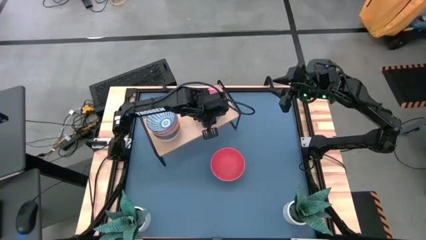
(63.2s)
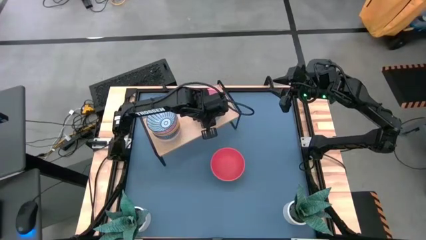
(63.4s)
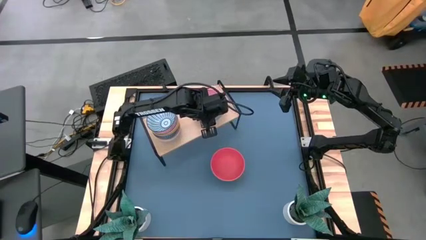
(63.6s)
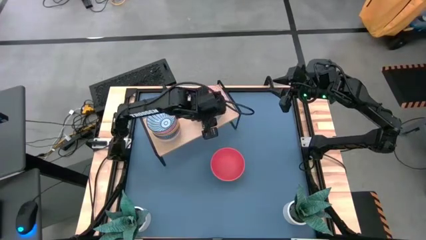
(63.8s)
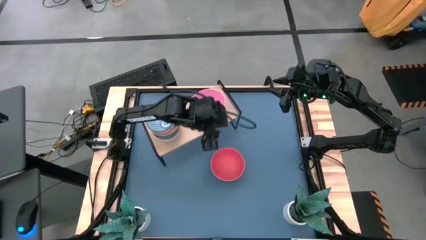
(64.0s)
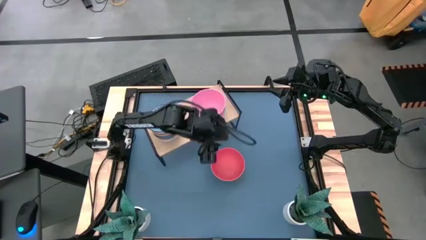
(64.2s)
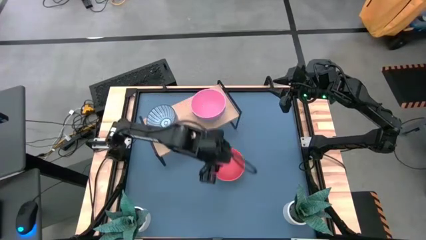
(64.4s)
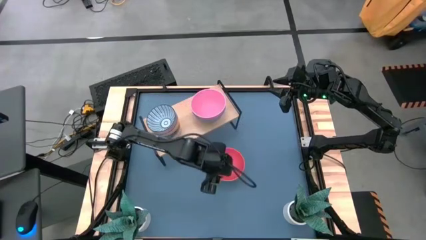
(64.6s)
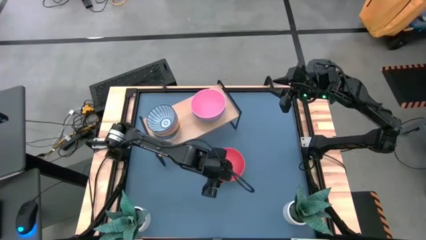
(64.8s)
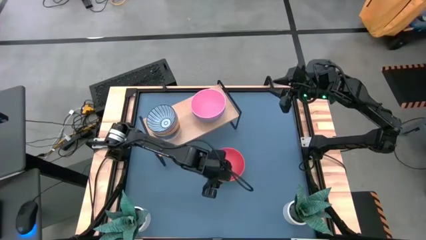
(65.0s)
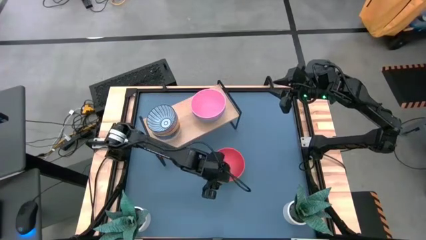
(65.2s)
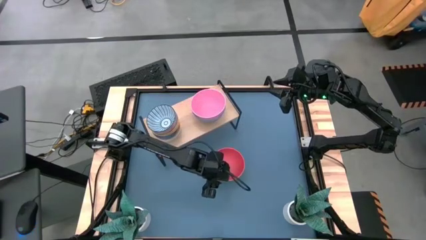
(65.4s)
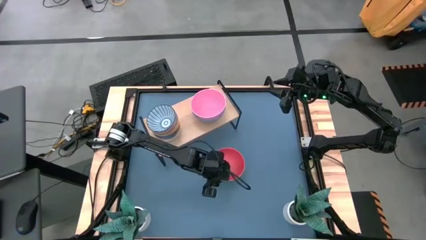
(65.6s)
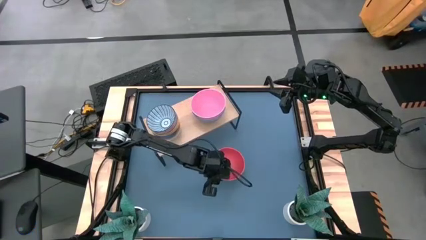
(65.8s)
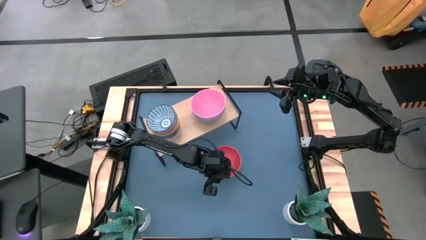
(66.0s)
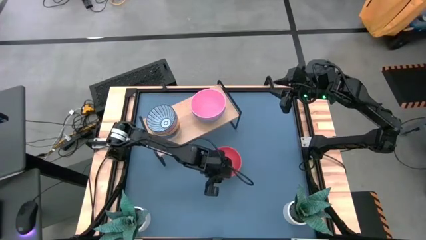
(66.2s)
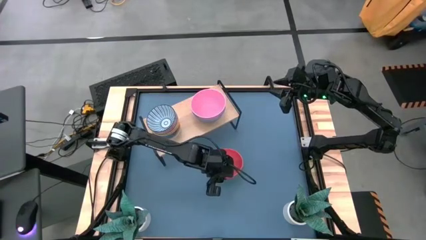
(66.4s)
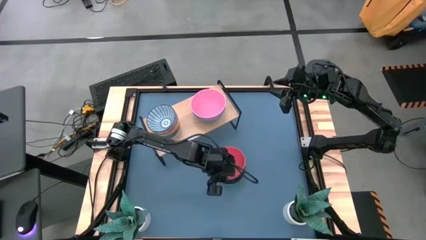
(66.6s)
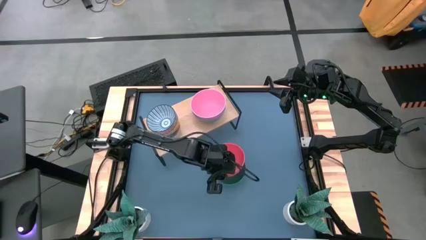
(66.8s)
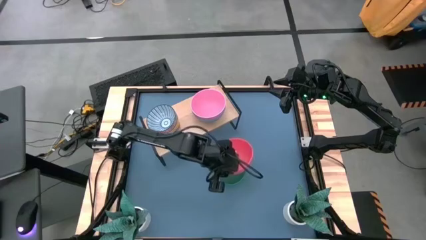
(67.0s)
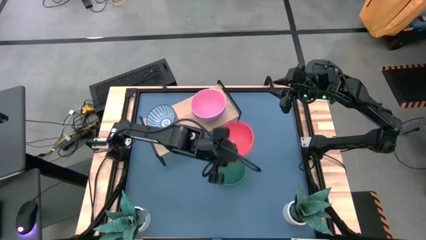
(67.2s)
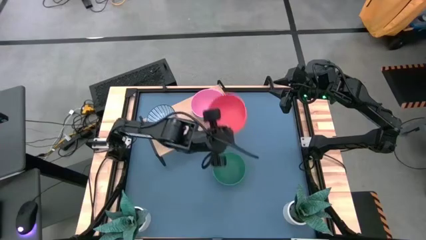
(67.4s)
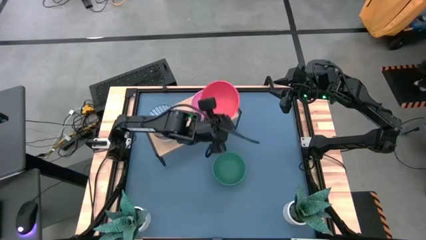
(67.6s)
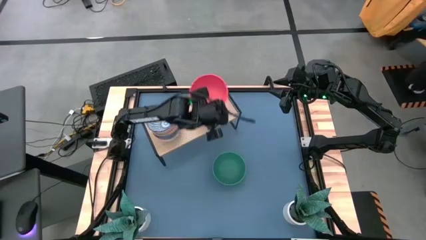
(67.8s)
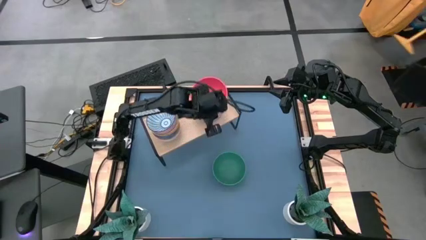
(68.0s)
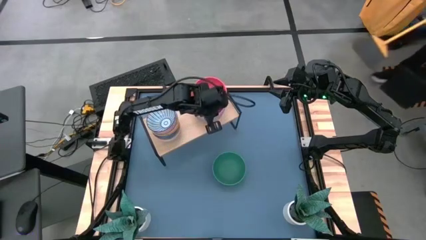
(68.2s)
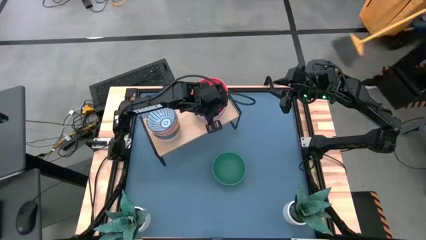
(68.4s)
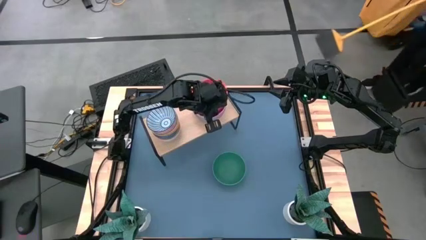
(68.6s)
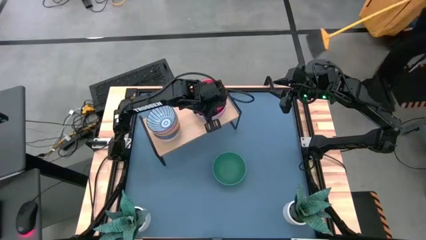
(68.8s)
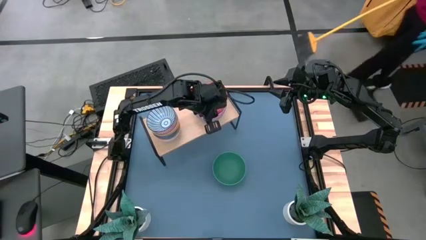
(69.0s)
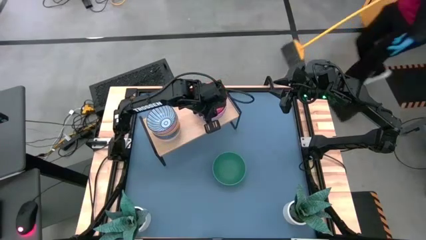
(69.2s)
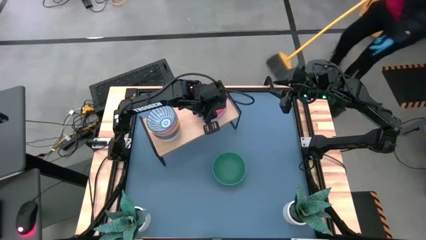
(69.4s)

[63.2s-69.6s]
Task: Place and stack bowls onto a shelf
Stack the big orange bowl on top of the big pink bowl on the shelf

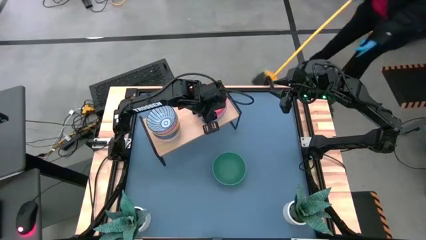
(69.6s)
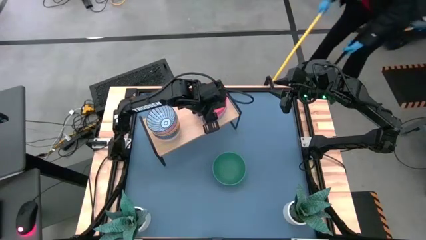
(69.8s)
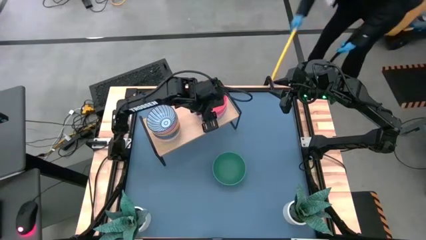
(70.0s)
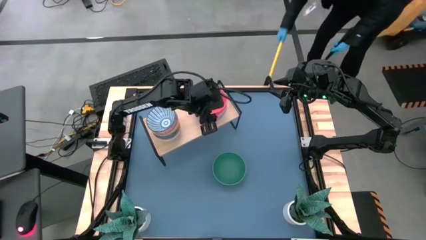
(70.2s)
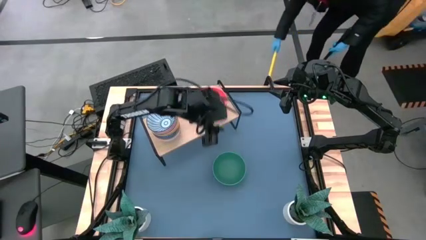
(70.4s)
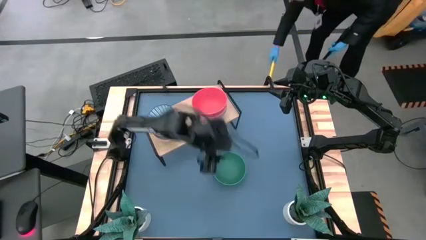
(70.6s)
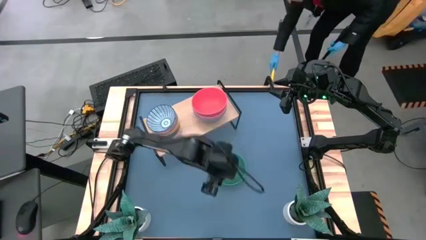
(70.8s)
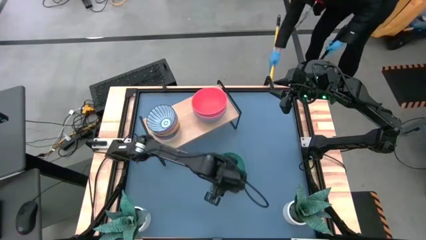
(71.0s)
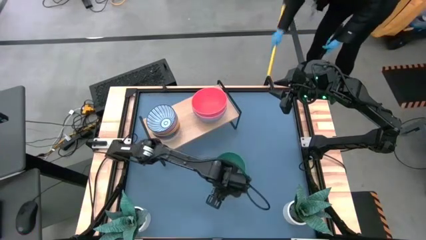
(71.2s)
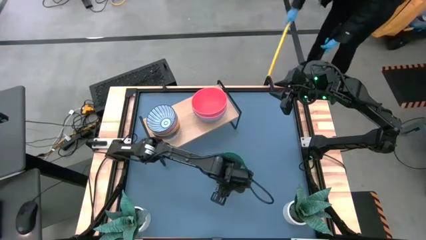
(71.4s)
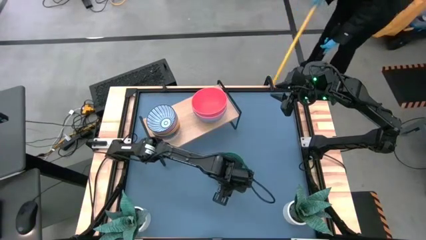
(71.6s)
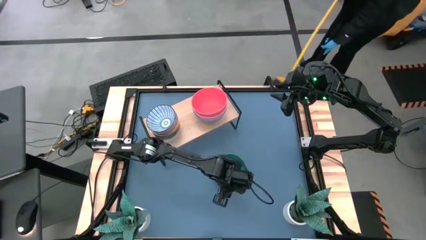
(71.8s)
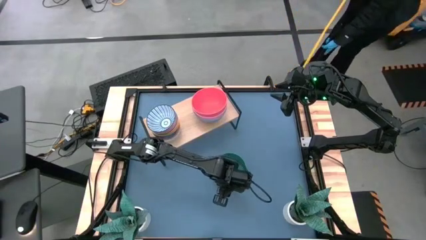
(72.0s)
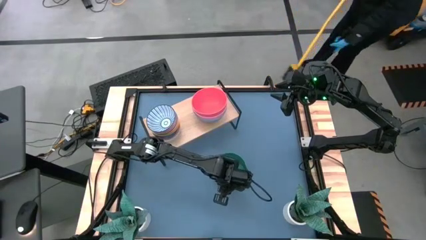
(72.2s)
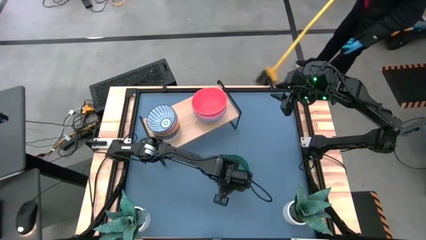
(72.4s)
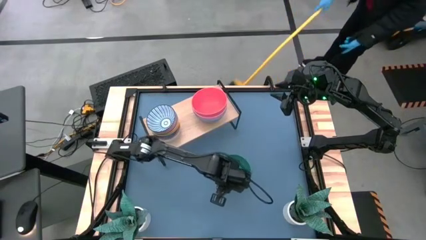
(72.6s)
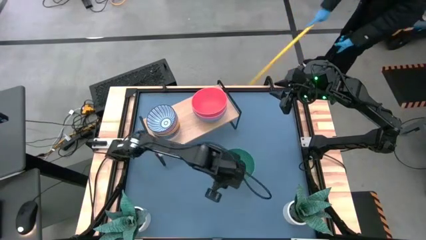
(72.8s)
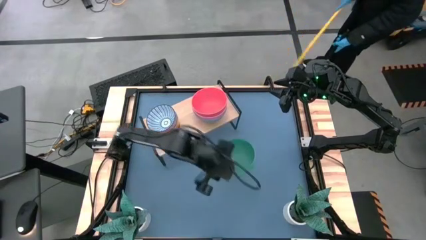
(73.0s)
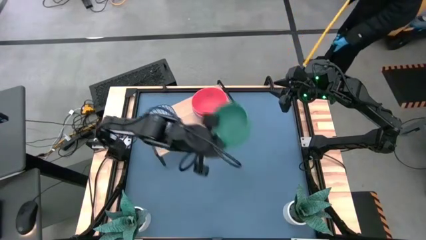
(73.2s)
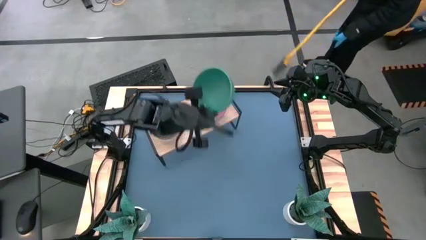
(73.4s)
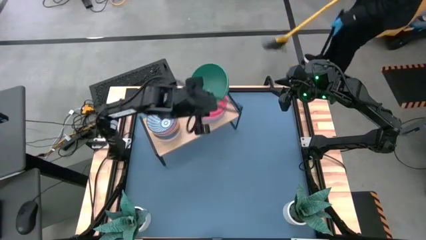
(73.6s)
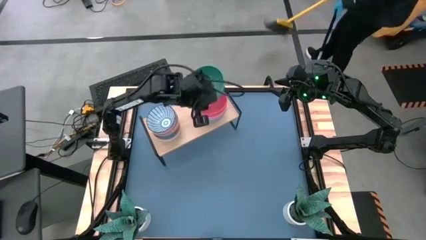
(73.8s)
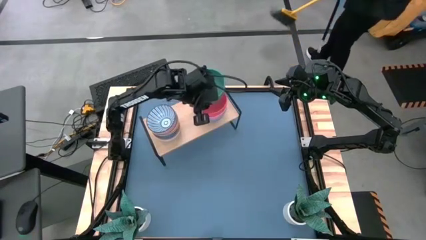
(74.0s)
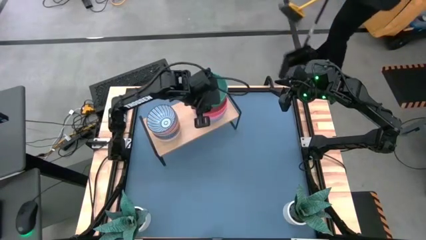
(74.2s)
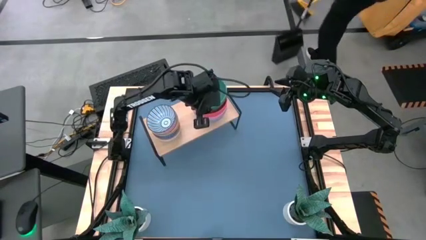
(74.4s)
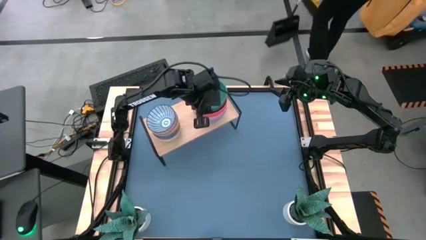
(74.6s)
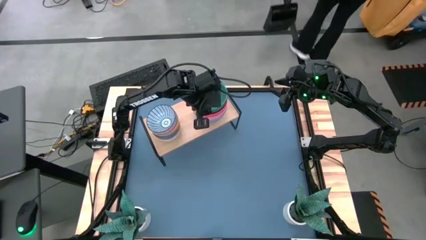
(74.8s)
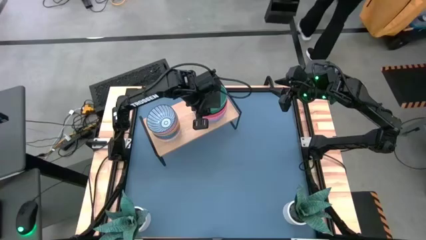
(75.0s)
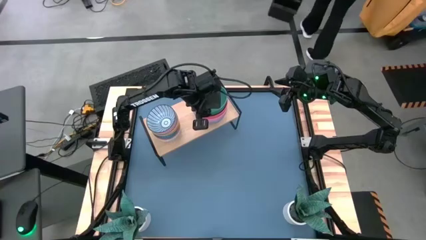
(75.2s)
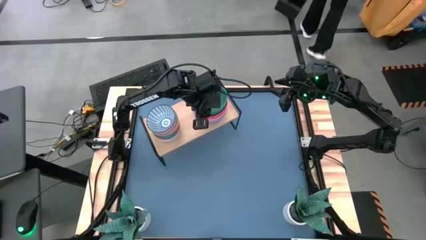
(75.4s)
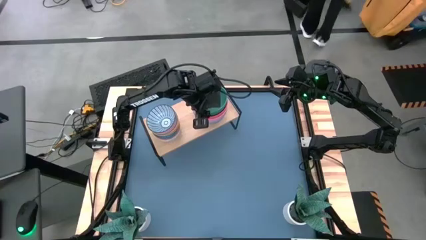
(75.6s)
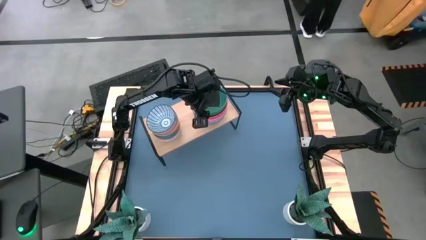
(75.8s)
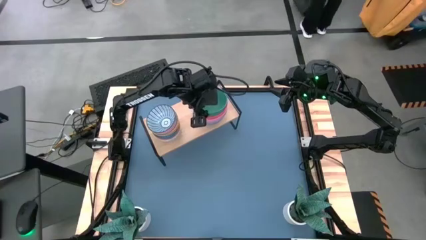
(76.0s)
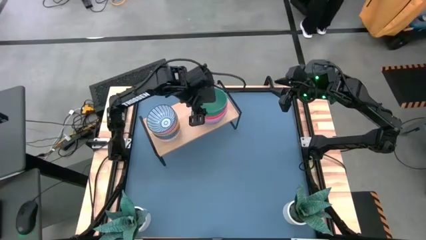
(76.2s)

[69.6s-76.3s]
Stack the big green bowl on top of the big pink bowl on the shelf
